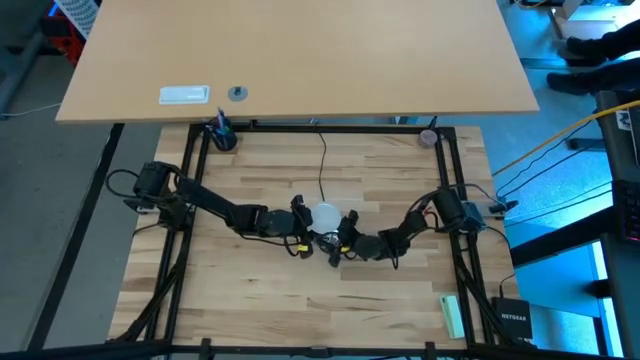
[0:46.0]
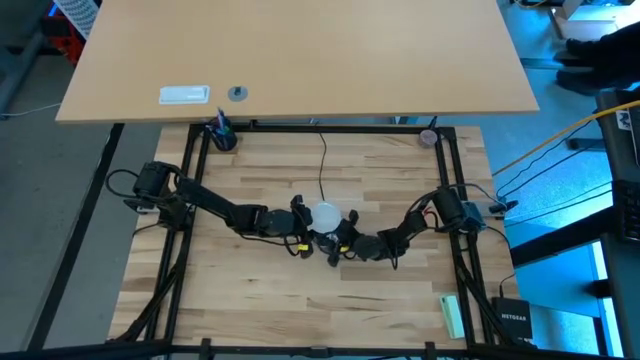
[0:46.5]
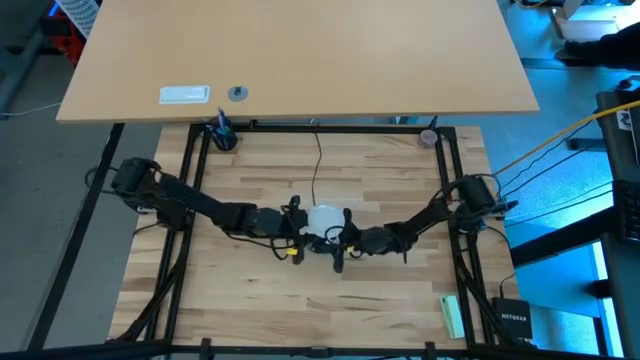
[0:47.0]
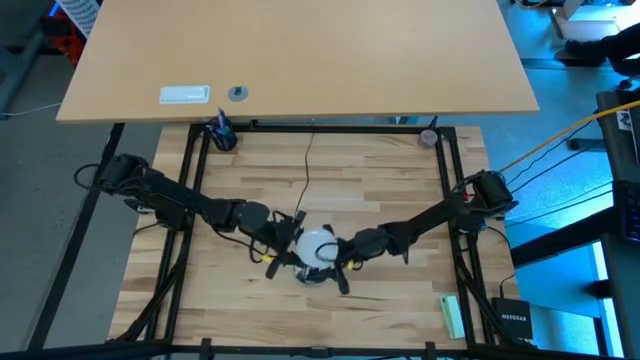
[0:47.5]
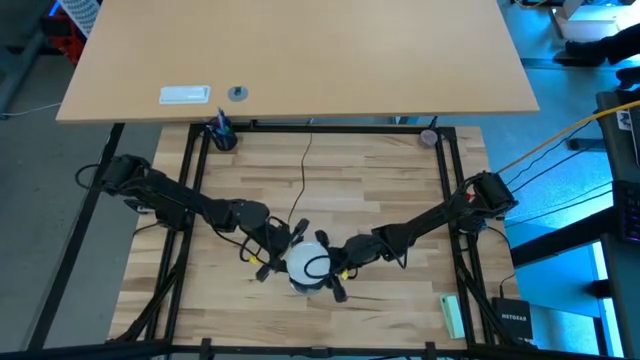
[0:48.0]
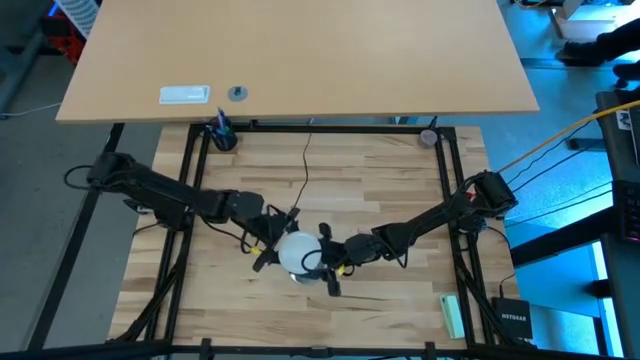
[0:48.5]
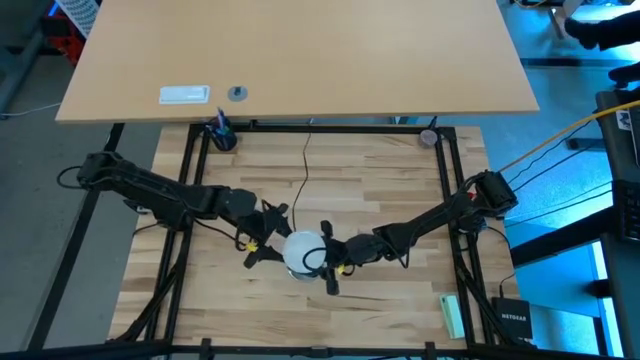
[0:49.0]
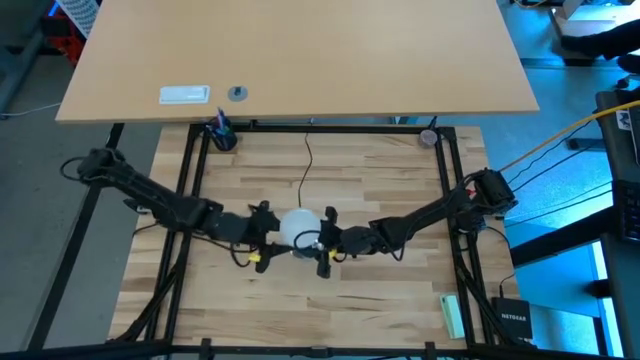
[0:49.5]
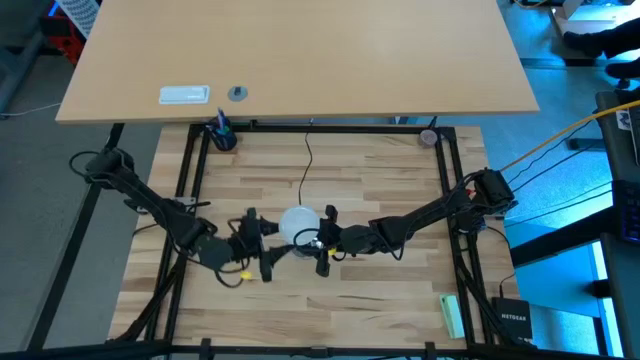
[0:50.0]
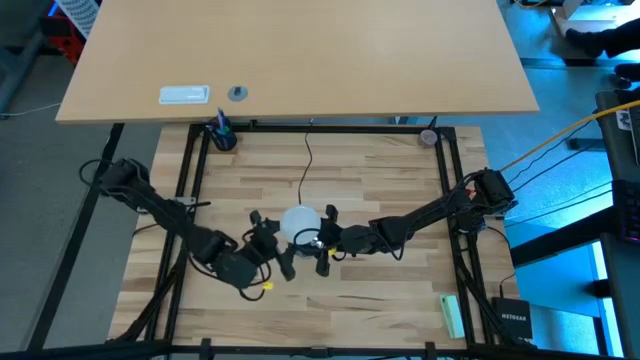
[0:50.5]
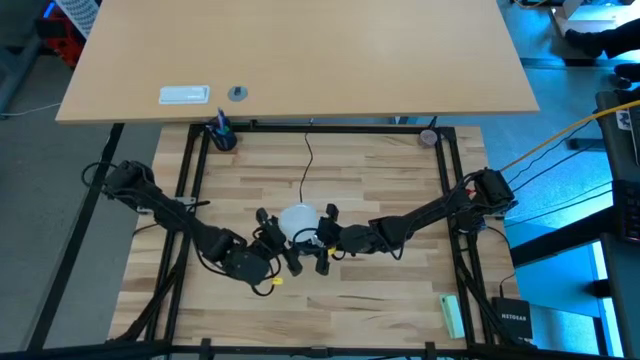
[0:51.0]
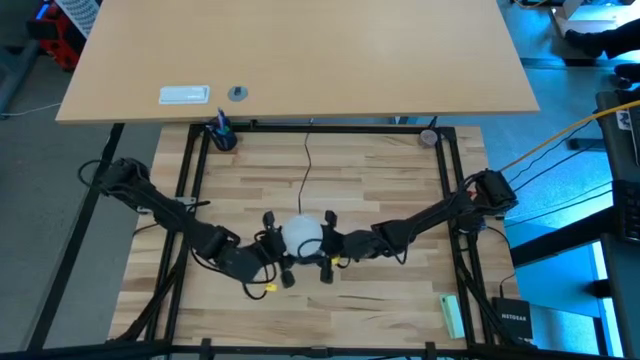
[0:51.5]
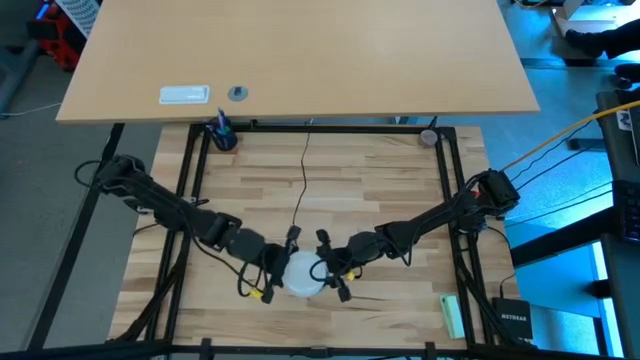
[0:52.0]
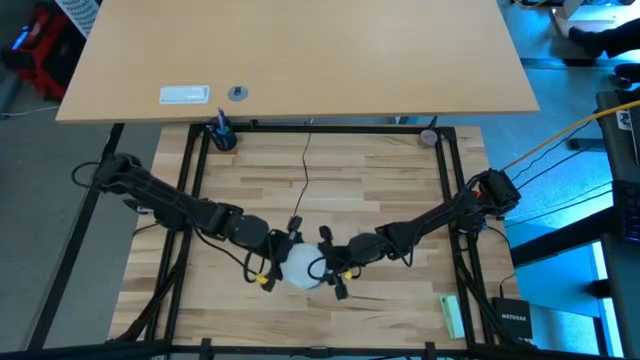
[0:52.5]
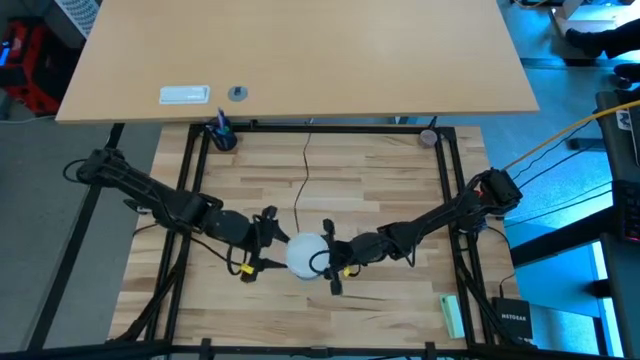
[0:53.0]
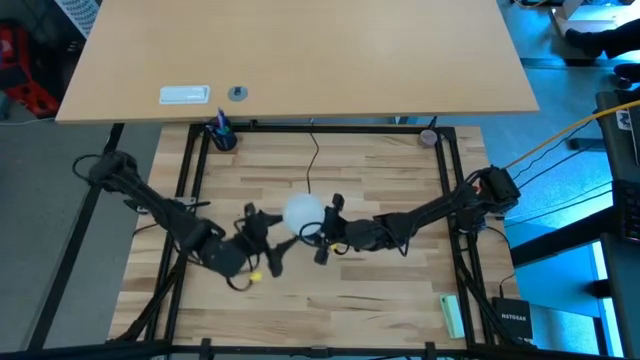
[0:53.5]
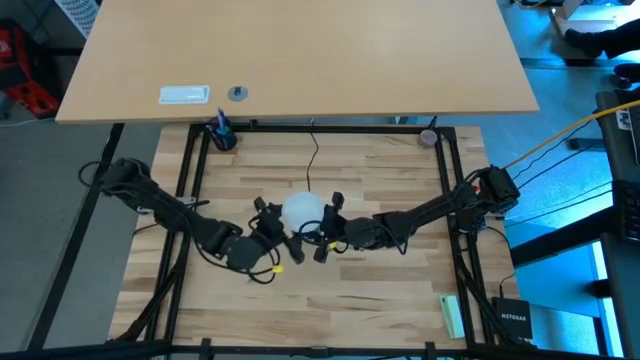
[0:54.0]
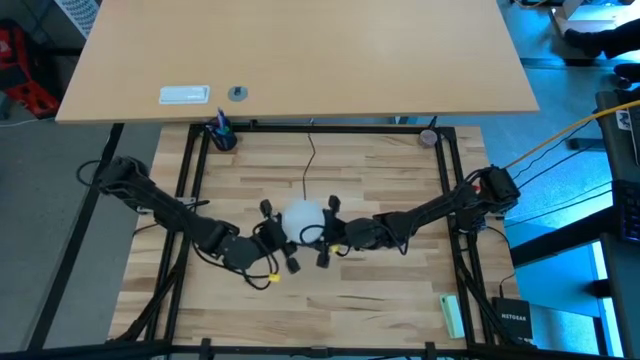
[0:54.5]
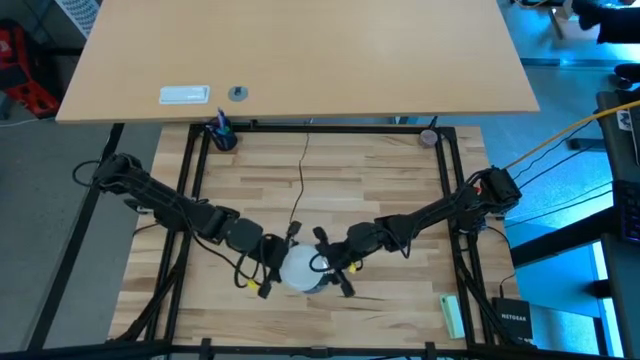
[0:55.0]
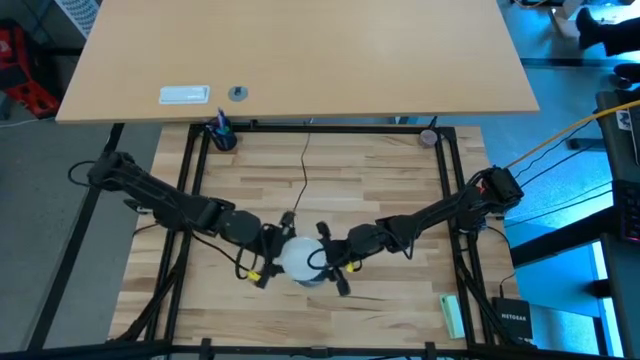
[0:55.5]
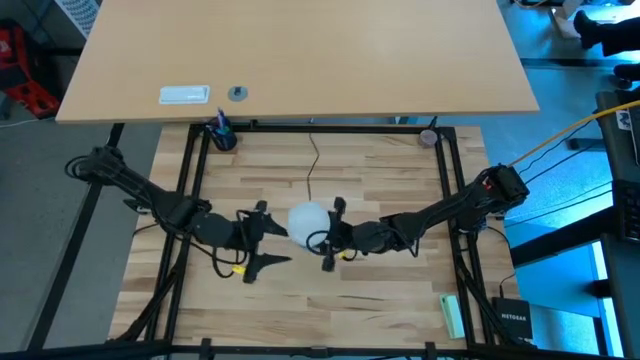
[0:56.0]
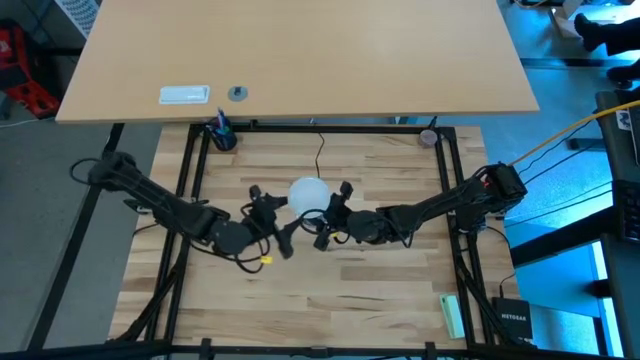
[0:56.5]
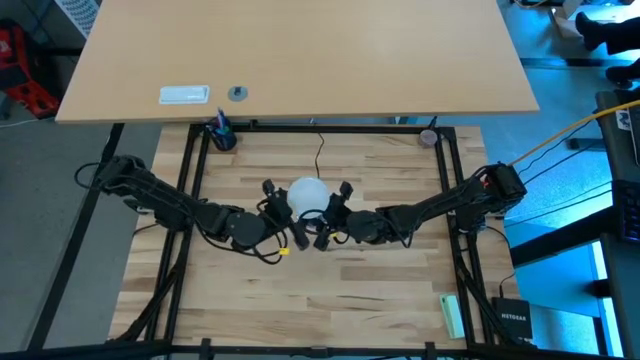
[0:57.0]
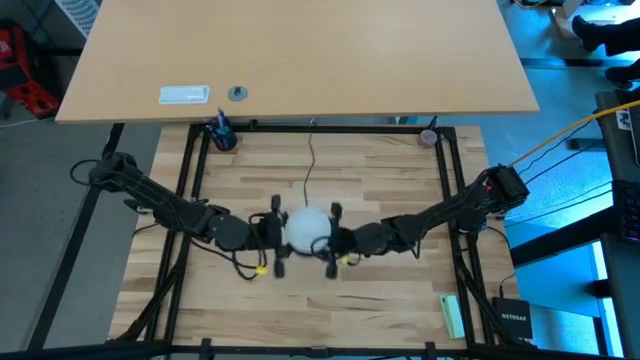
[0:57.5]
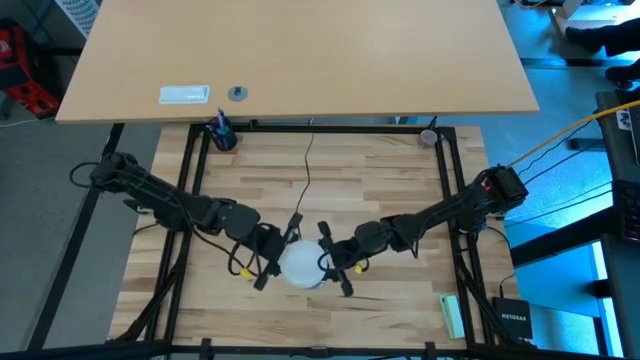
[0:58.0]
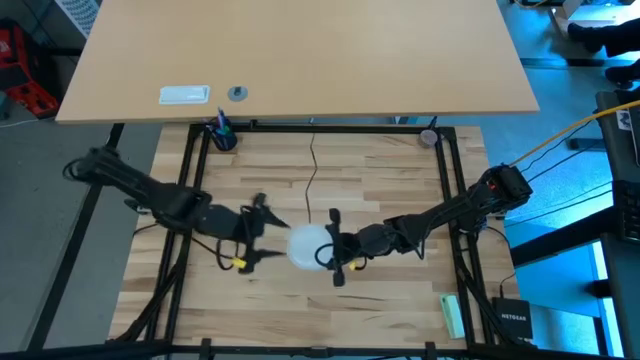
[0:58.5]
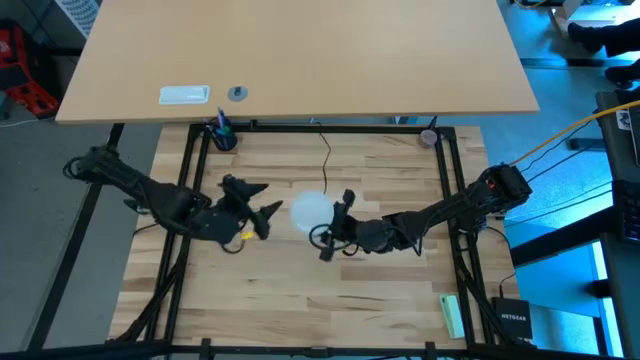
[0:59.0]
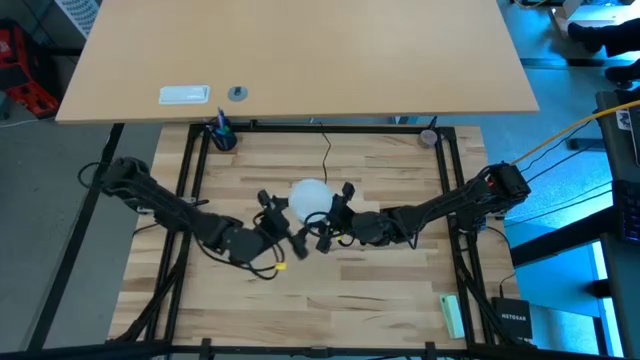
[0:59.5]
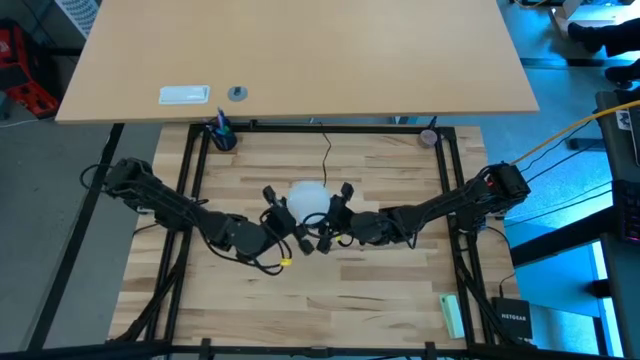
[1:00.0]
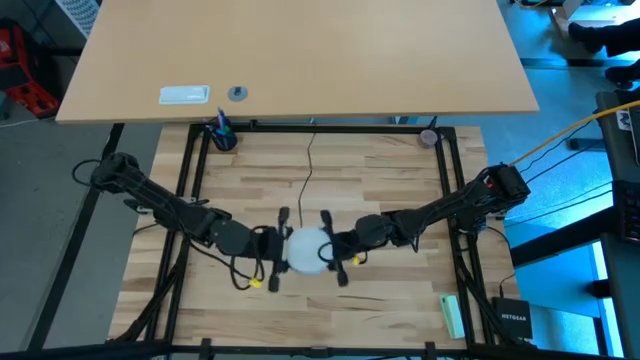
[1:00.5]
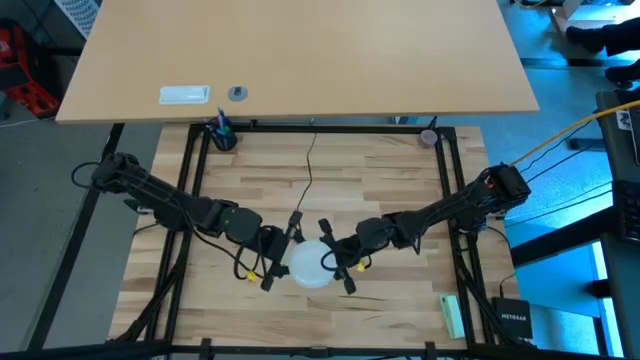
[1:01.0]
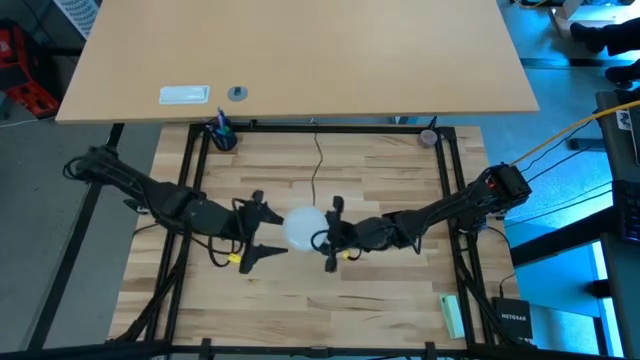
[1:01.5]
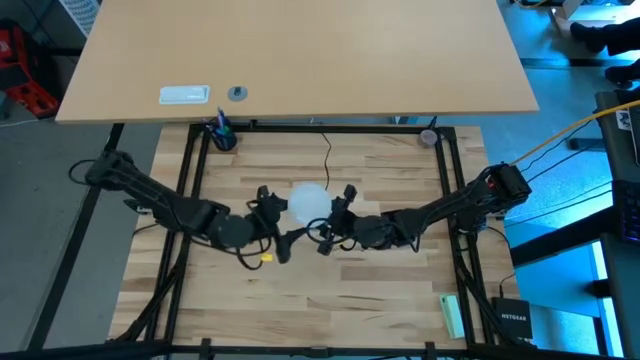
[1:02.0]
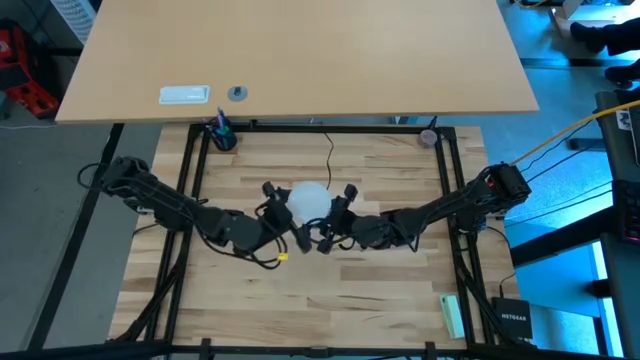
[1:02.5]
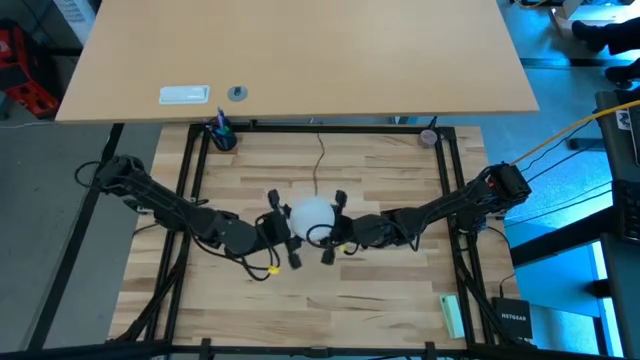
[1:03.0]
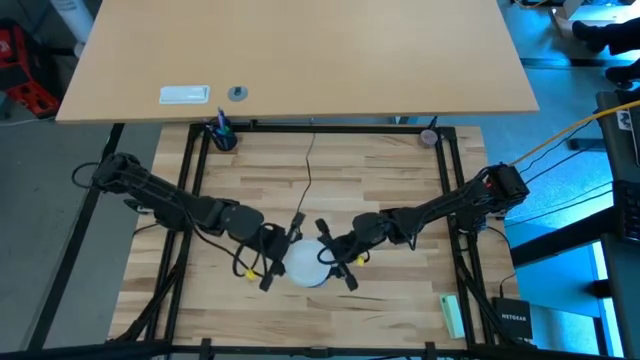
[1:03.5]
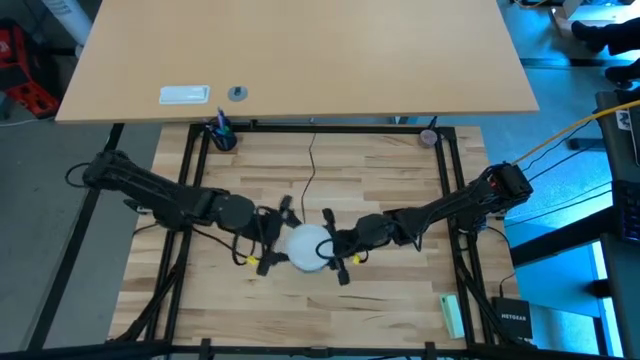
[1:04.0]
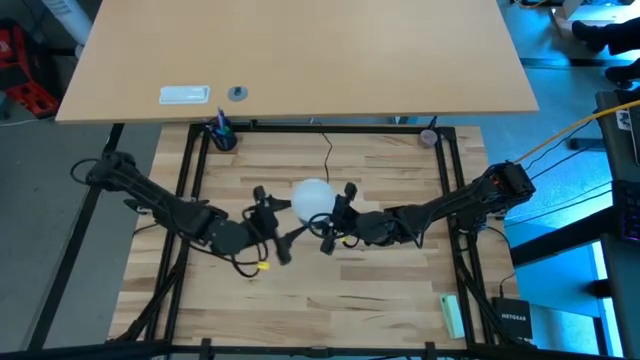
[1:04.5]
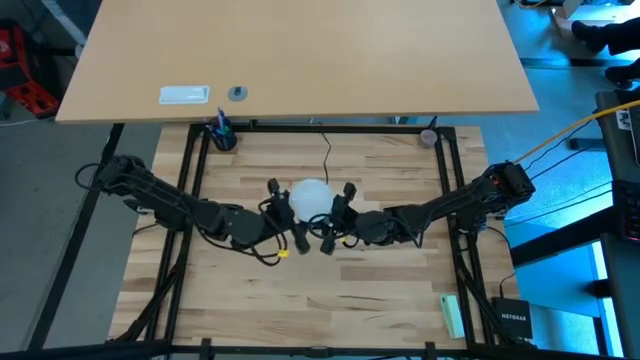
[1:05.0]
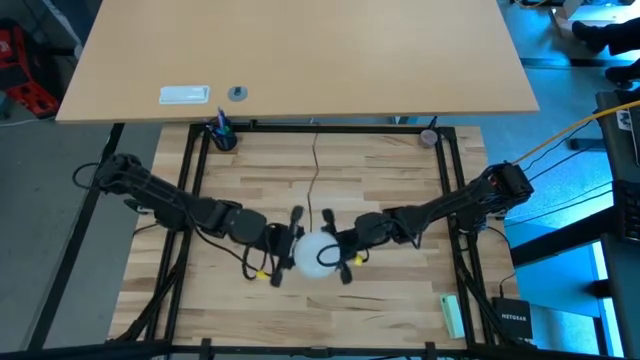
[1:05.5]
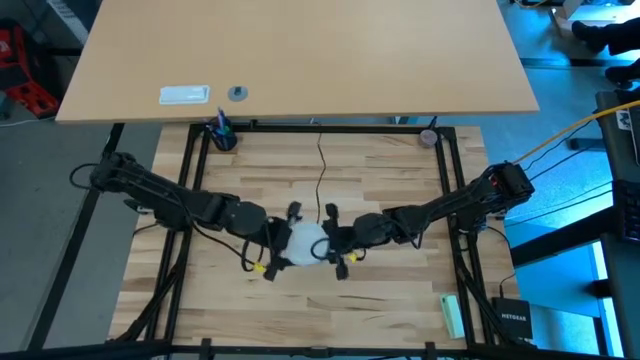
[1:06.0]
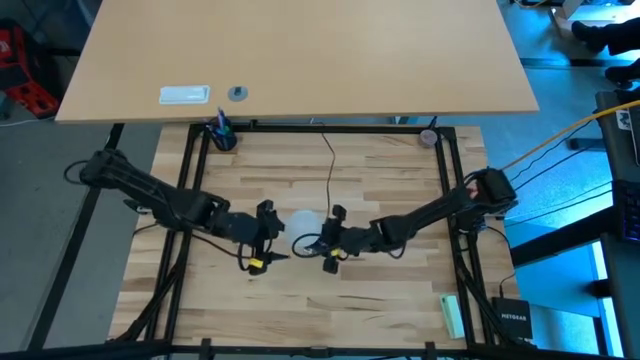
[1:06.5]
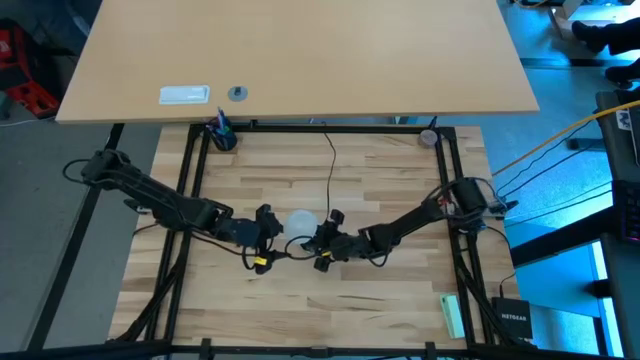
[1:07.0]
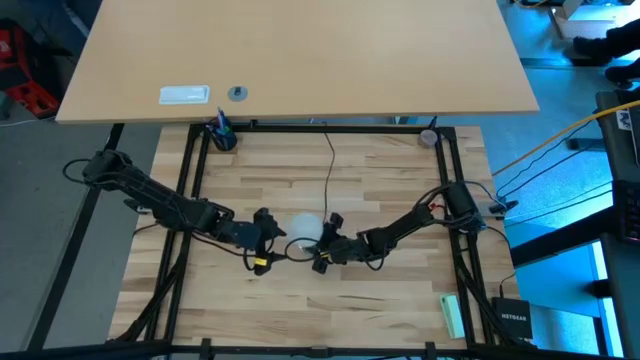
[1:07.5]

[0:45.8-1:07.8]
Task: Screw lightbulb
Insert the lightbulb on the lamp
